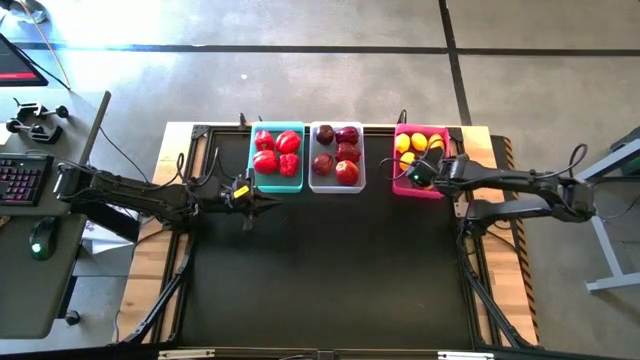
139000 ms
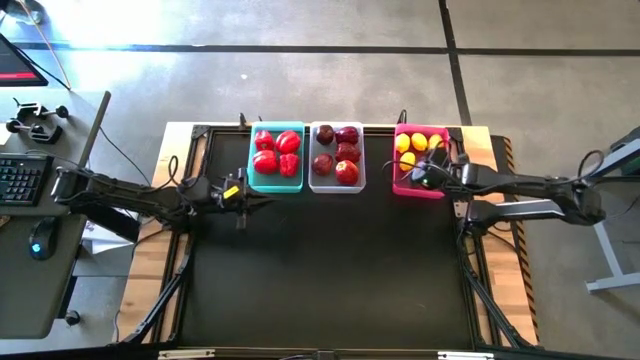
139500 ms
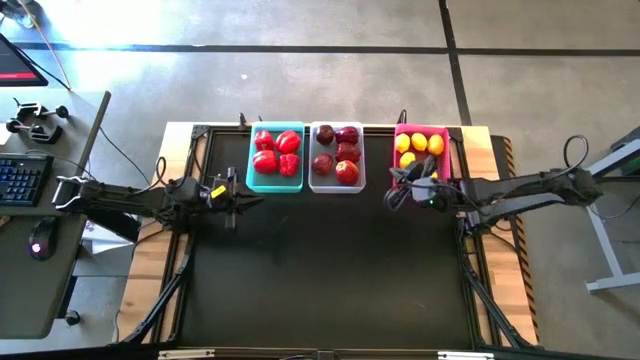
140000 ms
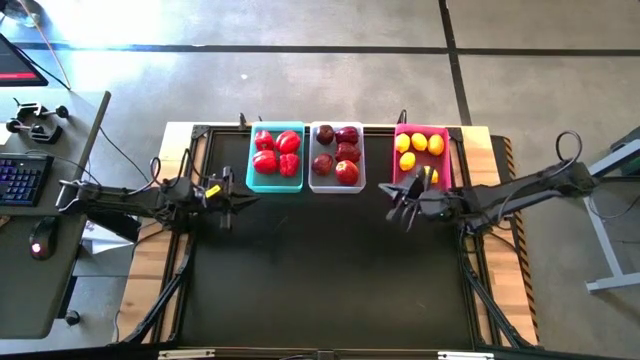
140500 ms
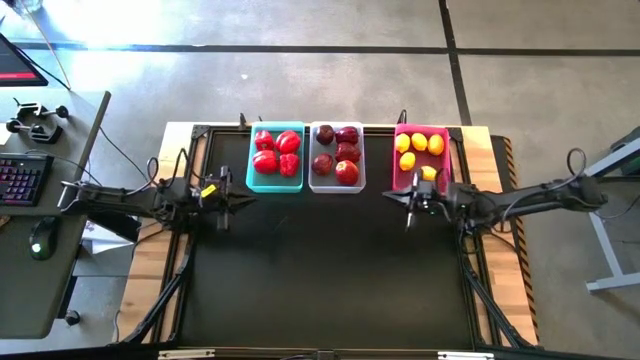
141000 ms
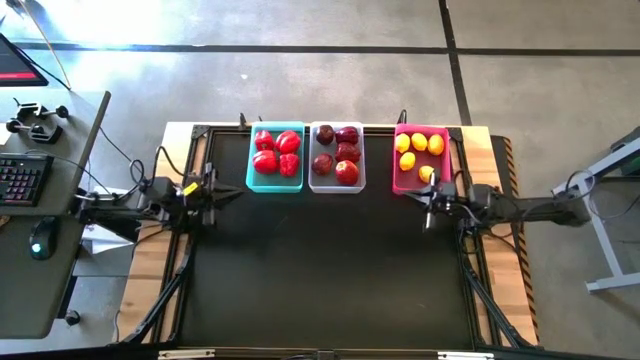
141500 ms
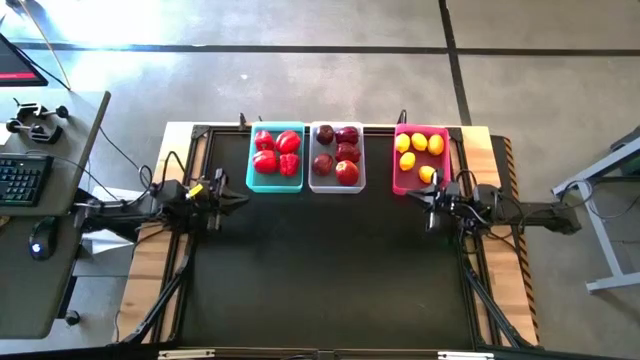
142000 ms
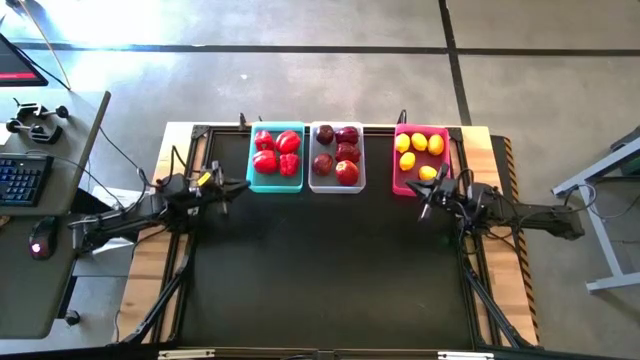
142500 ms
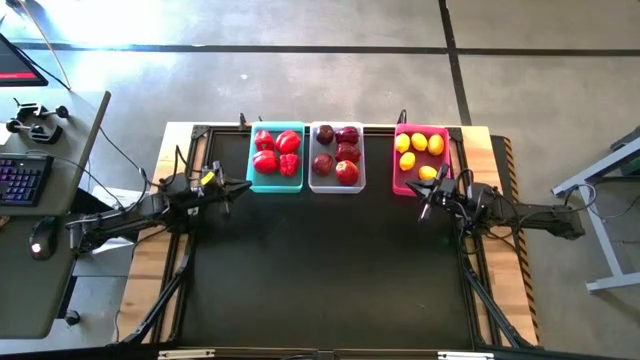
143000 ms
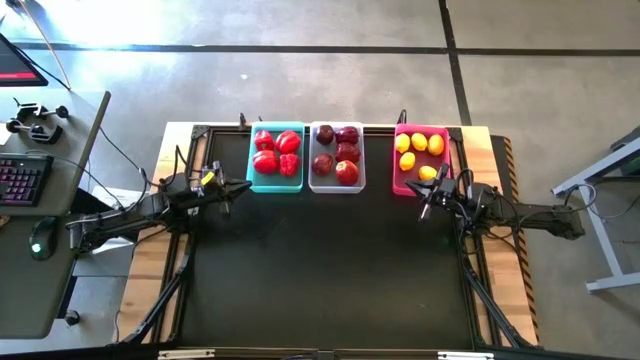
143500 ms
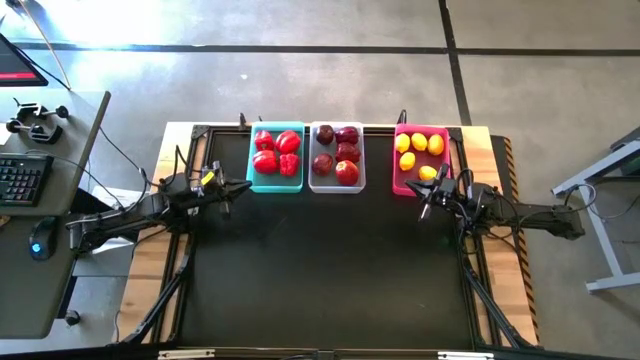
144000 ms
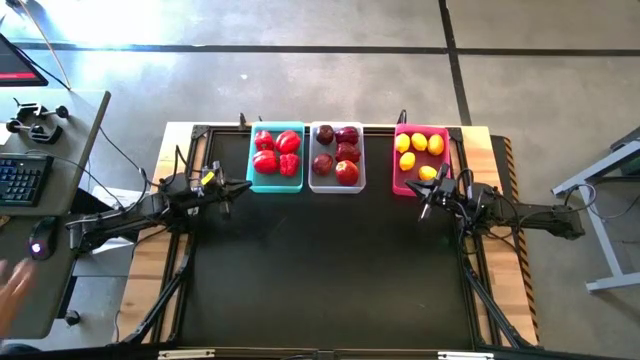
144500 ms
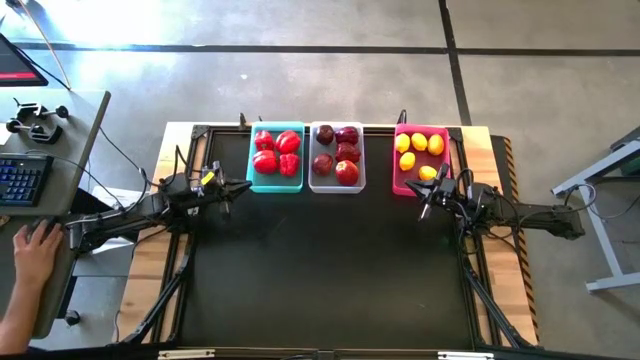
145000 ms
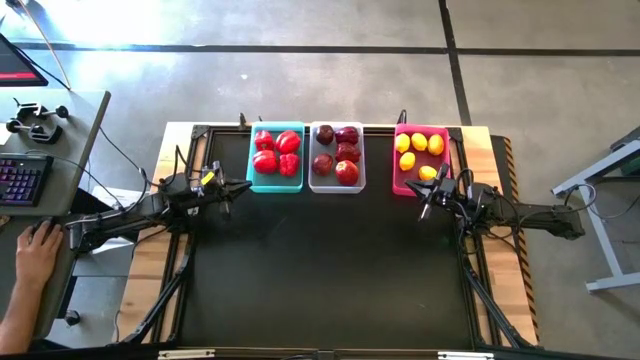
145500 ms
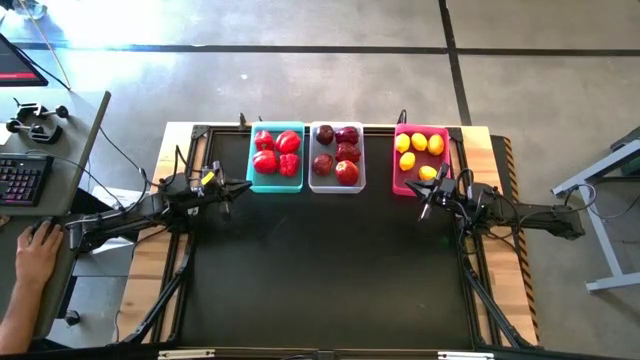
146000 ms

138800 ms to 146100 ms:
Task: Sort produce into baskets
Return to Home Position

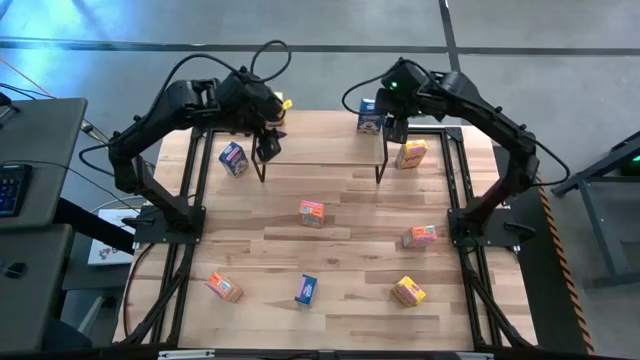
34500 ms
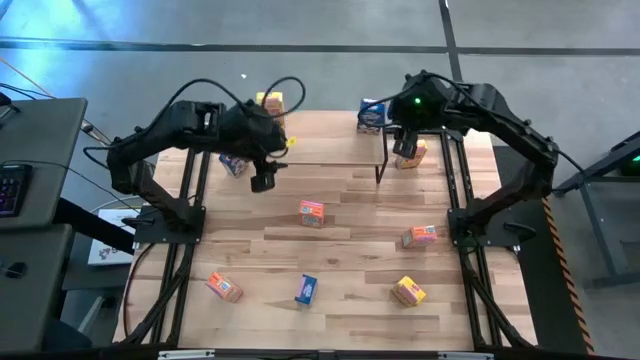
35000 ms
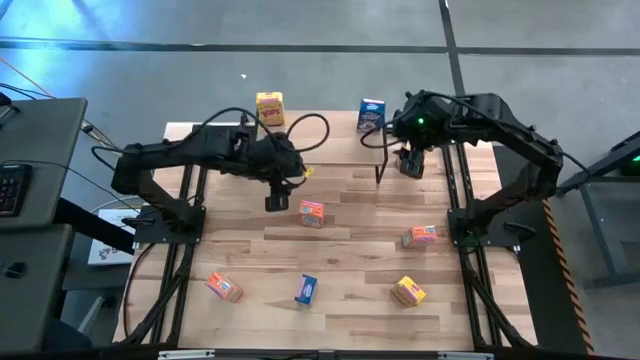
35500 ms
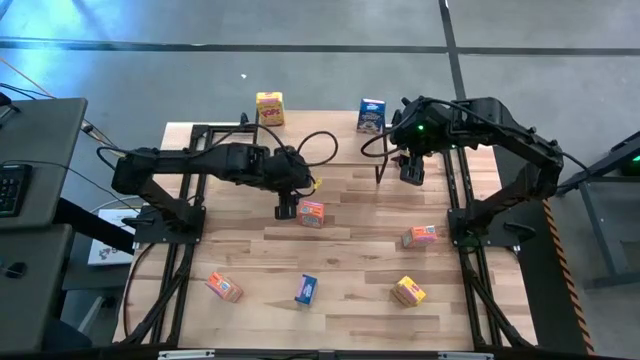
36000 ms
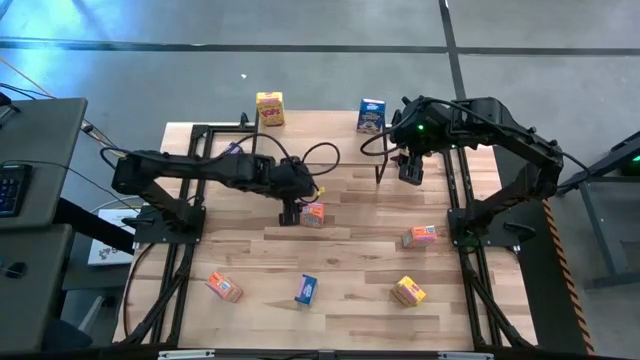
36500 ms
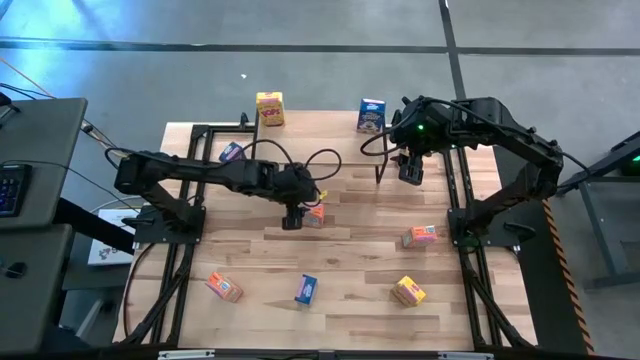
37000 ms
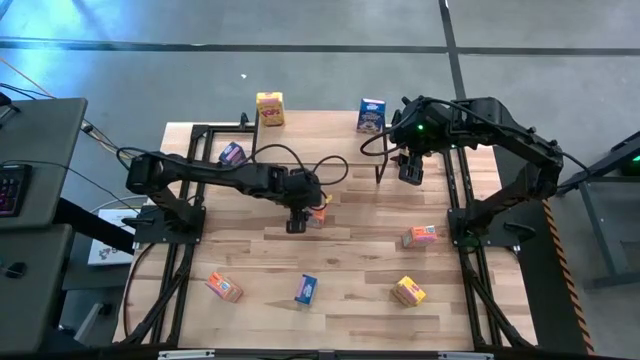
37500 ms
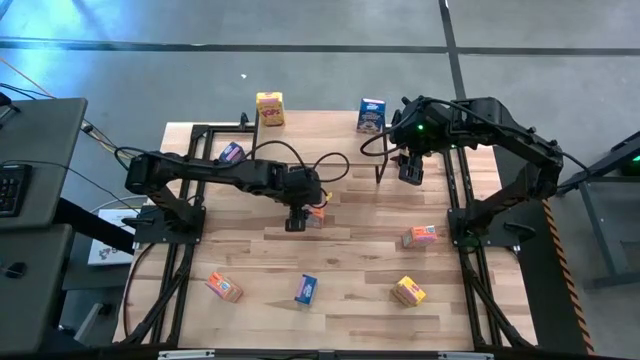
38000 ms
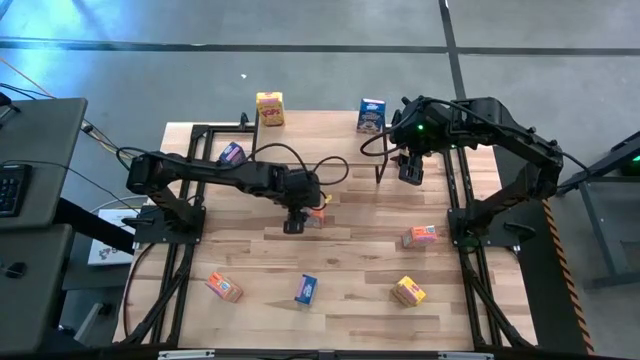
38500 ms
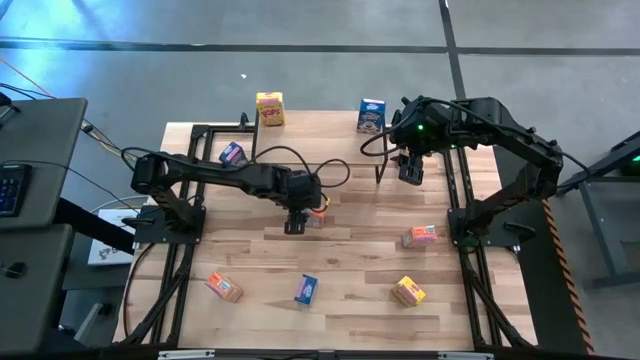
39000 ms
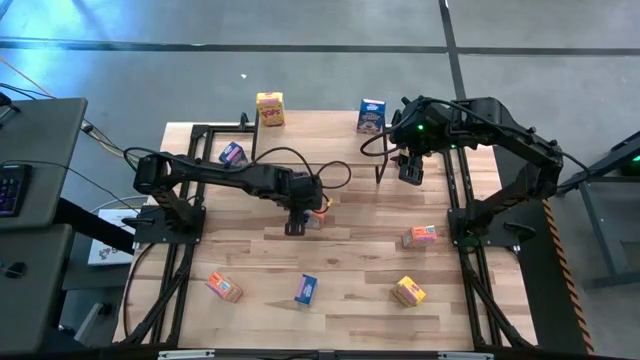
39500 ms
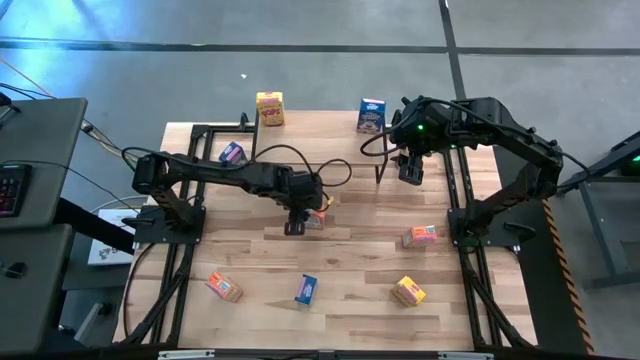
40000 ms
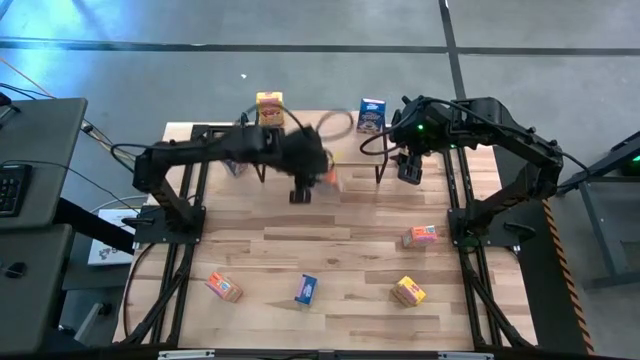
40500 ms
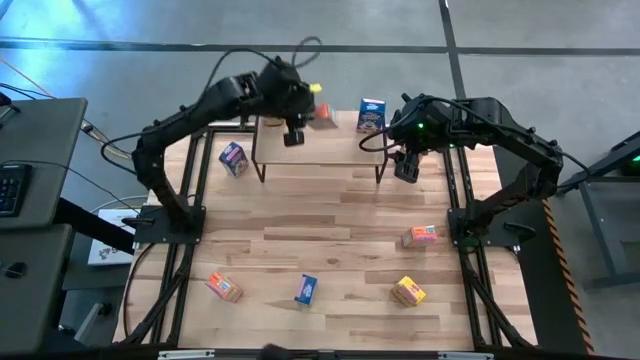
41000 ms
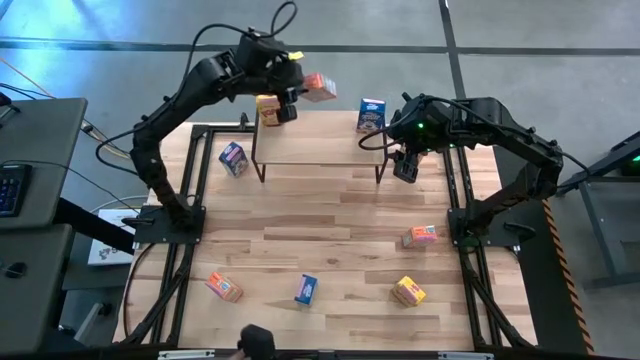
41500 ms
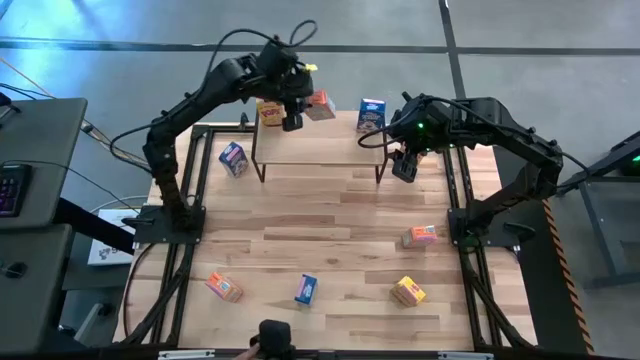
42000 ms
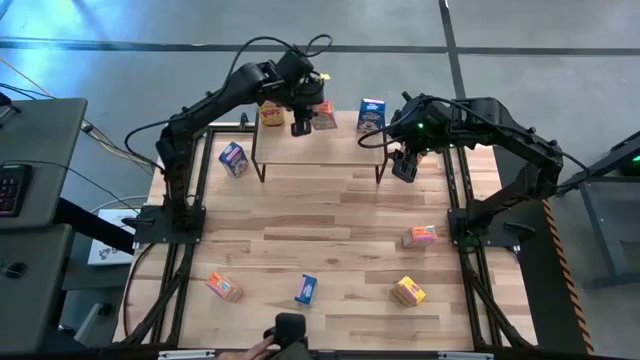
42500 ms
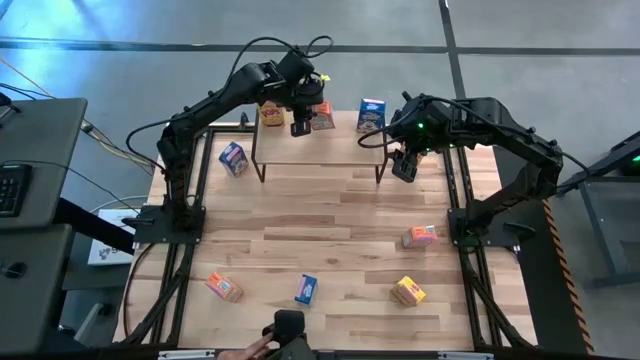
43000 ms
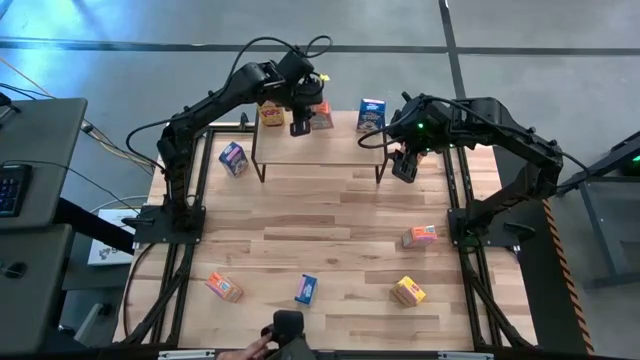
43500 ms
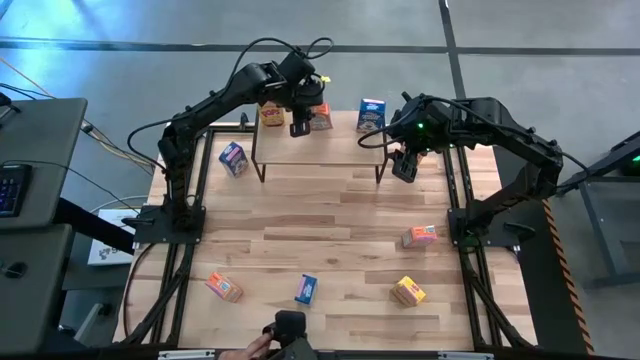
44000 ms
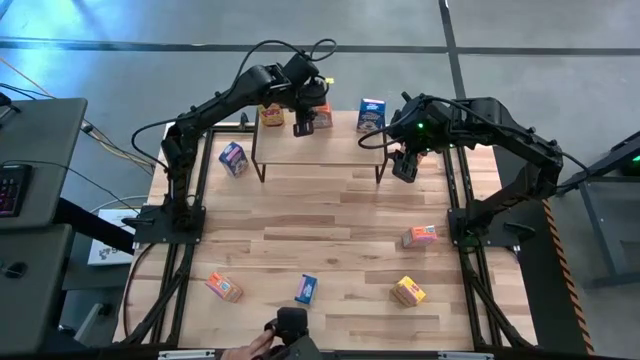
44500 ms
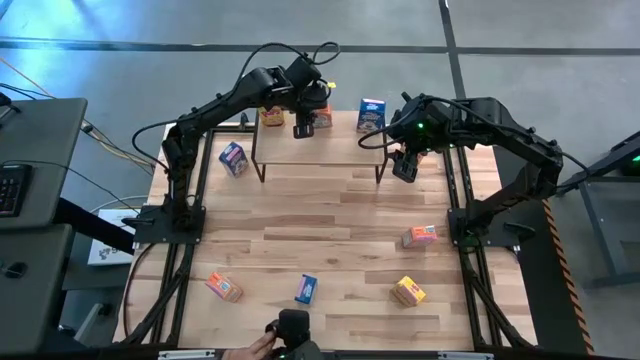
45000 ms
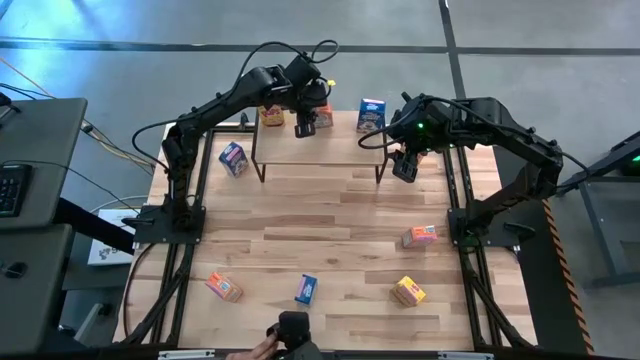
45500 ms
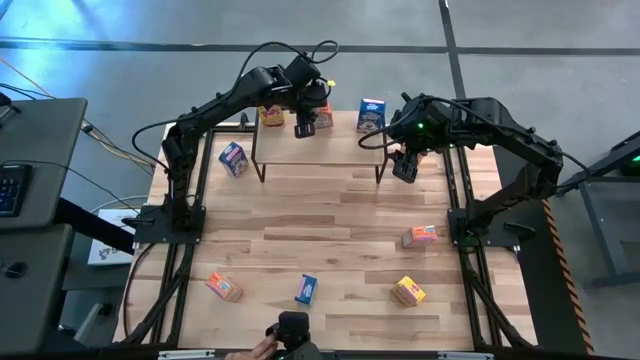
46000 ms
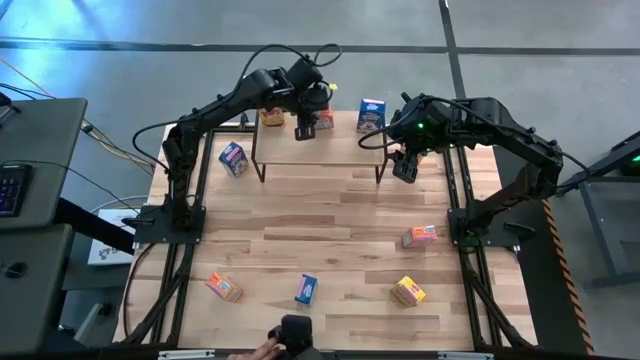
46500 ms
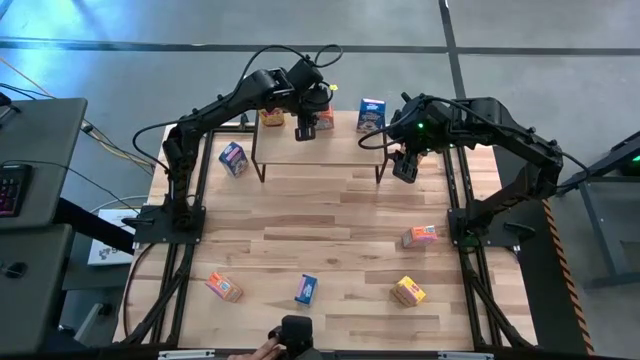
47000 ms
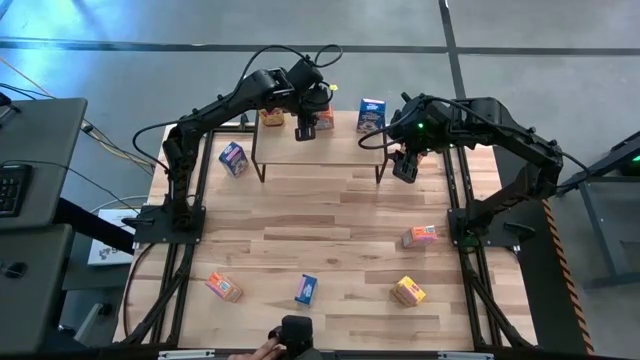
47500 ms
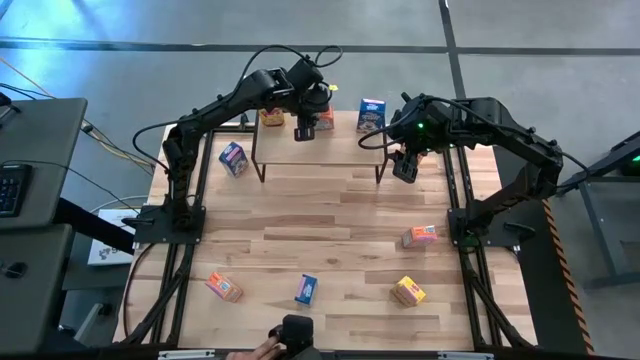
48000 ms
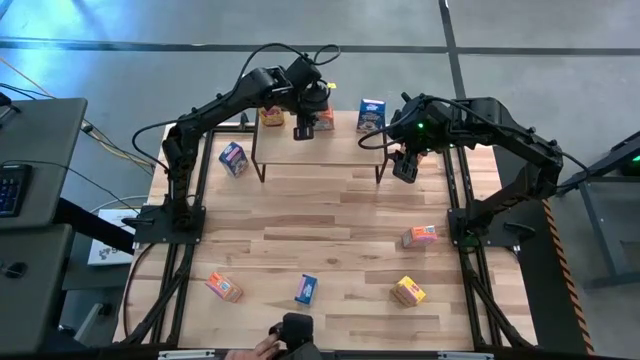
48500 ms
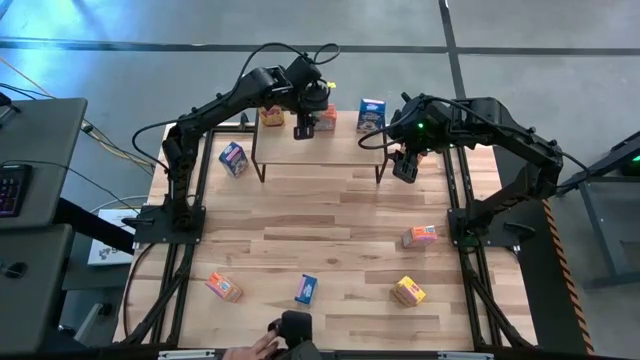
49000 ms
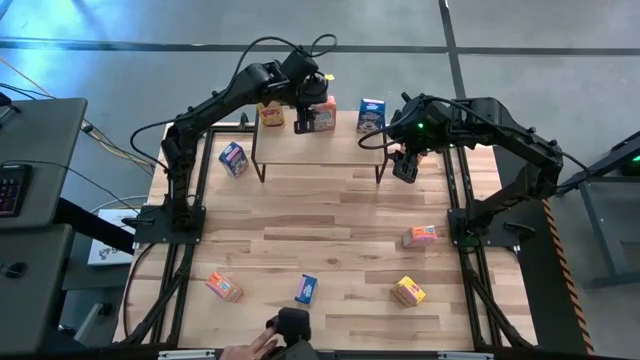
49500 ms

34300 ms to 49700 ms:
Task: Stack cereal on shelf
Put the middle orange cereal box on the shelf
